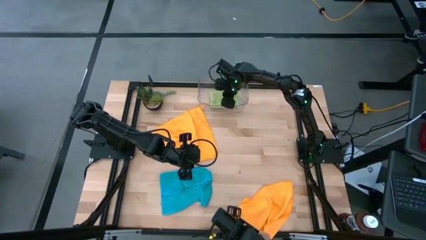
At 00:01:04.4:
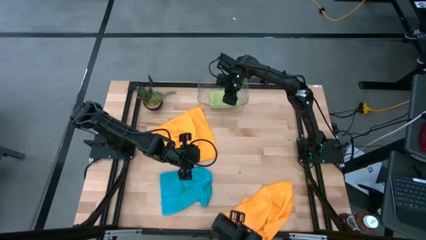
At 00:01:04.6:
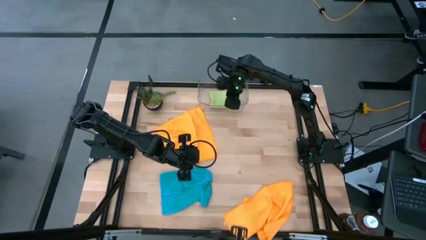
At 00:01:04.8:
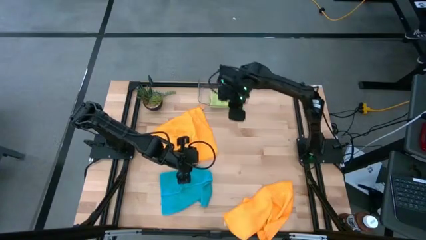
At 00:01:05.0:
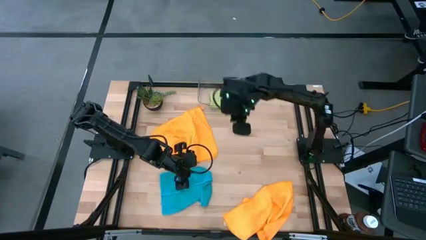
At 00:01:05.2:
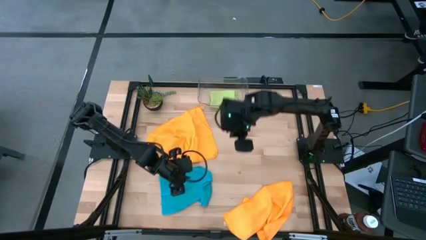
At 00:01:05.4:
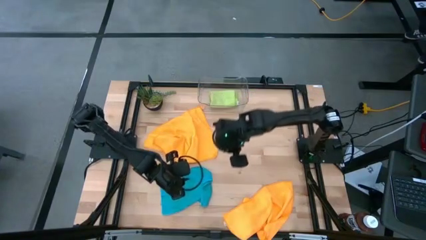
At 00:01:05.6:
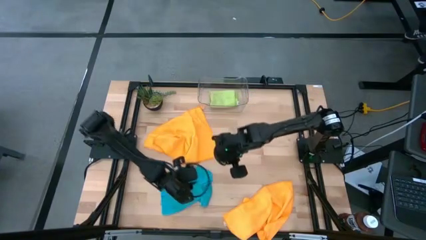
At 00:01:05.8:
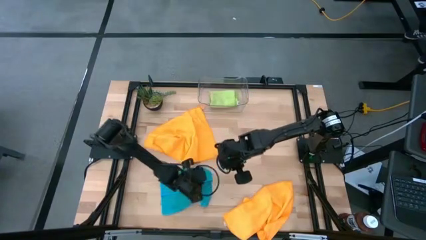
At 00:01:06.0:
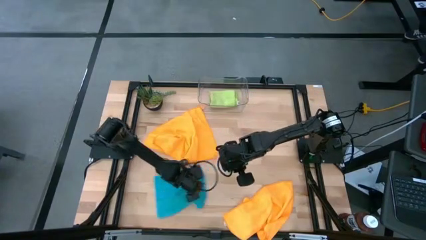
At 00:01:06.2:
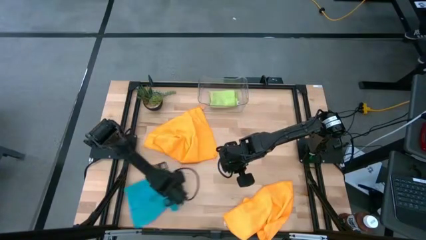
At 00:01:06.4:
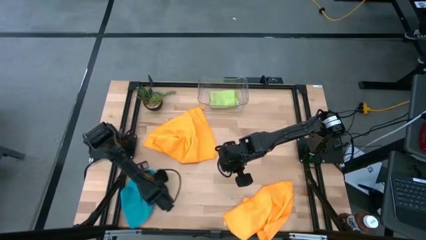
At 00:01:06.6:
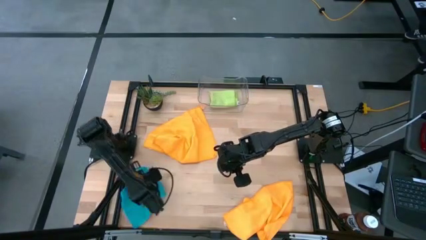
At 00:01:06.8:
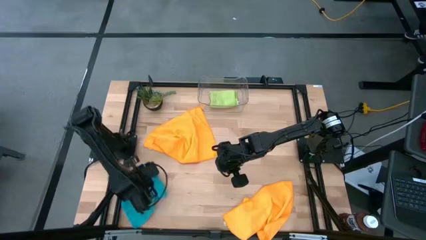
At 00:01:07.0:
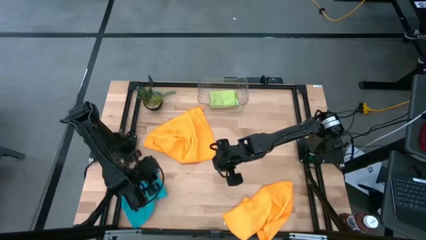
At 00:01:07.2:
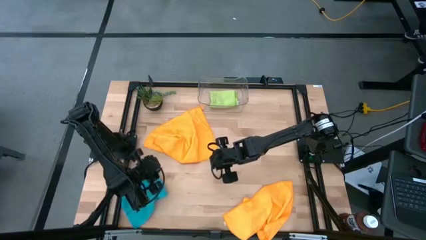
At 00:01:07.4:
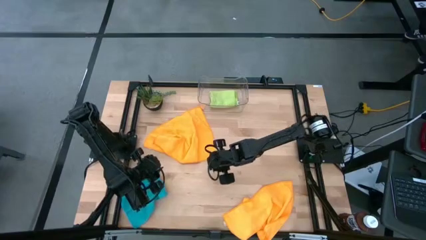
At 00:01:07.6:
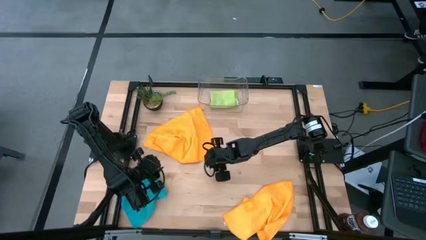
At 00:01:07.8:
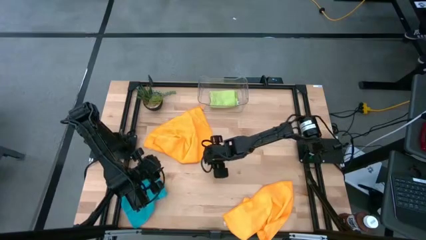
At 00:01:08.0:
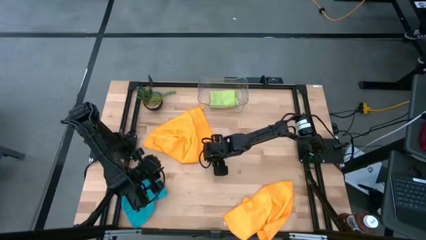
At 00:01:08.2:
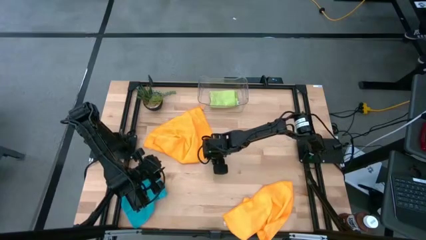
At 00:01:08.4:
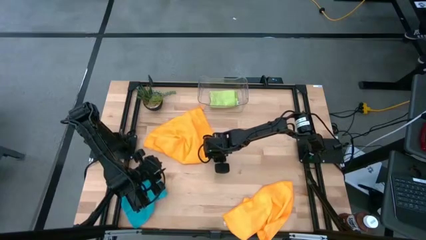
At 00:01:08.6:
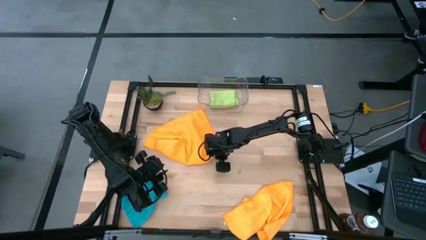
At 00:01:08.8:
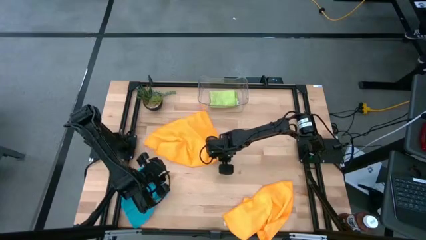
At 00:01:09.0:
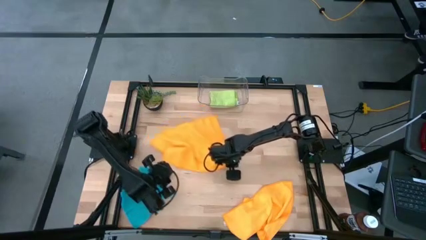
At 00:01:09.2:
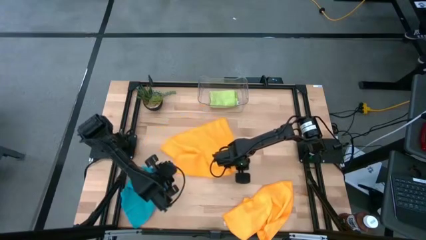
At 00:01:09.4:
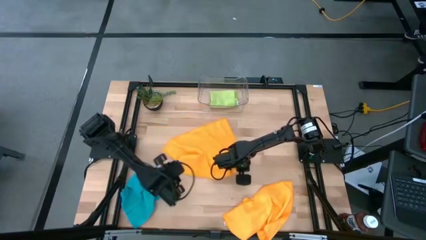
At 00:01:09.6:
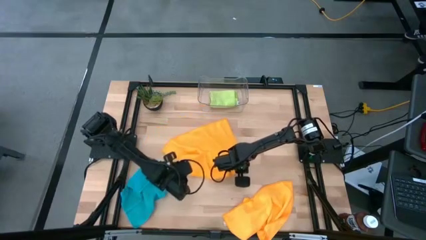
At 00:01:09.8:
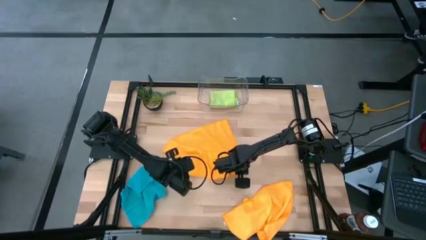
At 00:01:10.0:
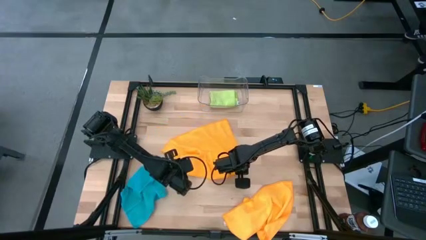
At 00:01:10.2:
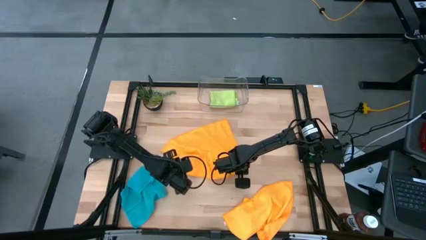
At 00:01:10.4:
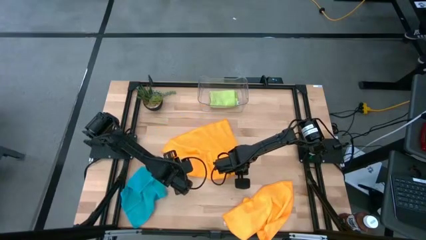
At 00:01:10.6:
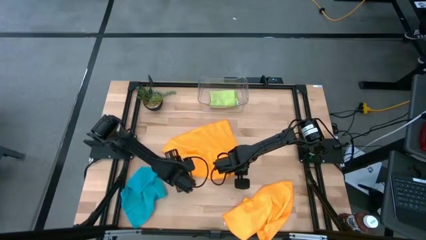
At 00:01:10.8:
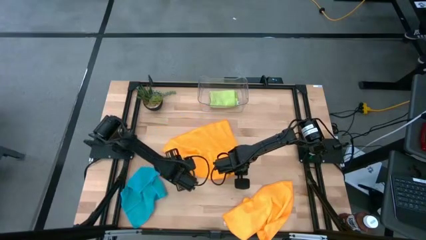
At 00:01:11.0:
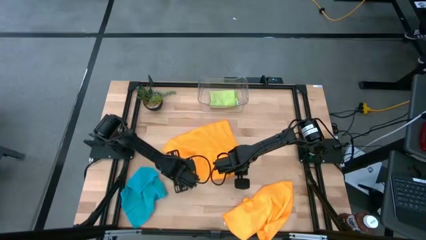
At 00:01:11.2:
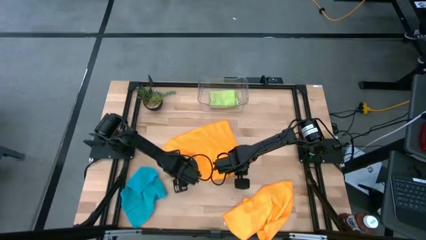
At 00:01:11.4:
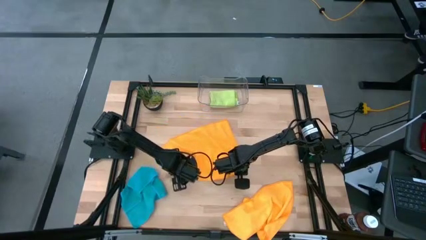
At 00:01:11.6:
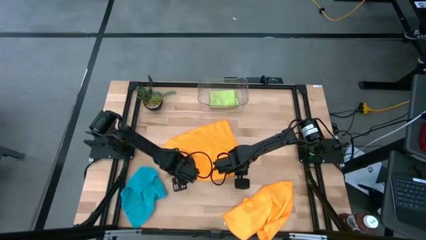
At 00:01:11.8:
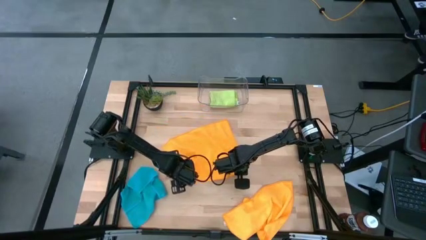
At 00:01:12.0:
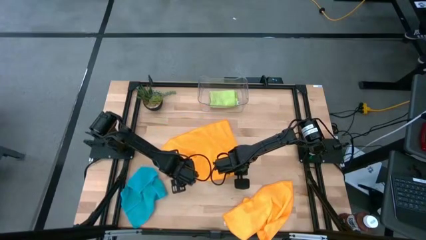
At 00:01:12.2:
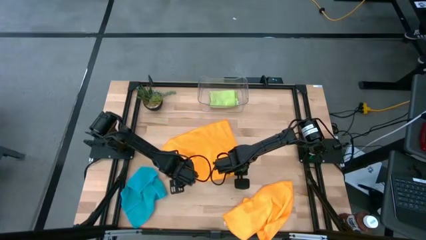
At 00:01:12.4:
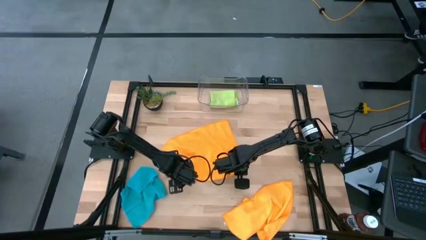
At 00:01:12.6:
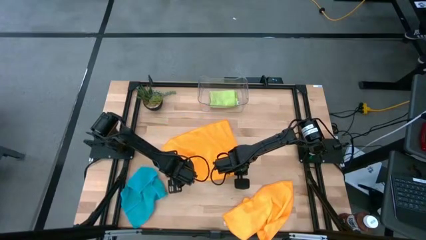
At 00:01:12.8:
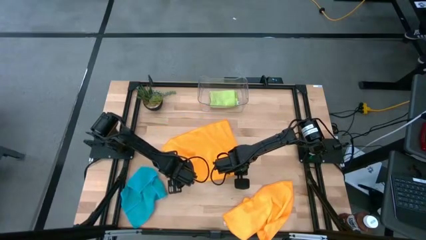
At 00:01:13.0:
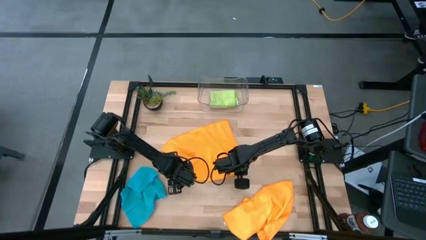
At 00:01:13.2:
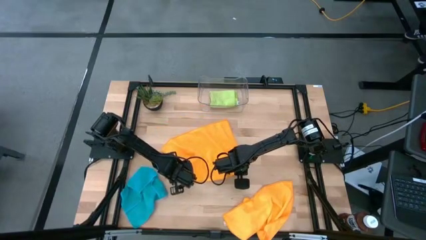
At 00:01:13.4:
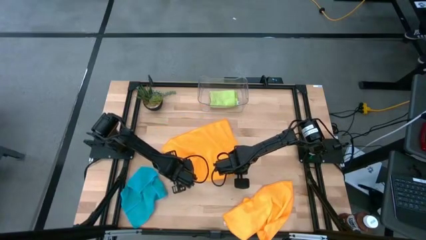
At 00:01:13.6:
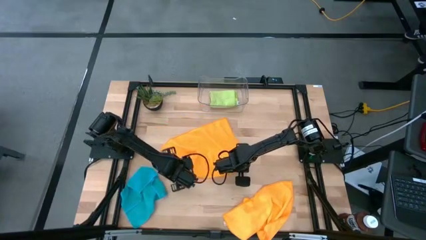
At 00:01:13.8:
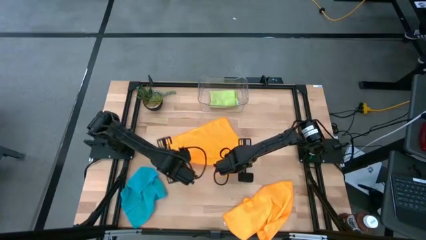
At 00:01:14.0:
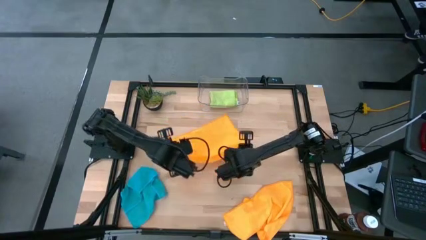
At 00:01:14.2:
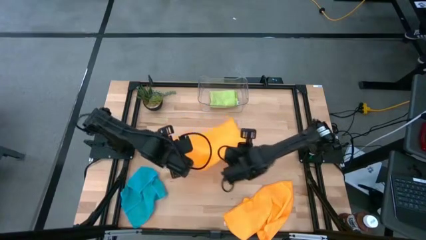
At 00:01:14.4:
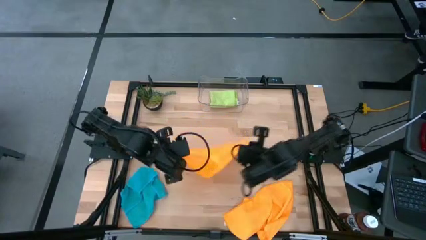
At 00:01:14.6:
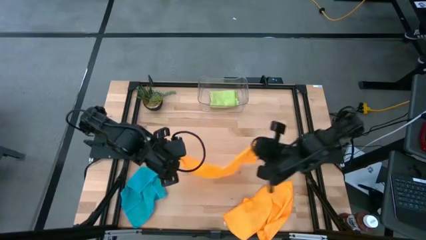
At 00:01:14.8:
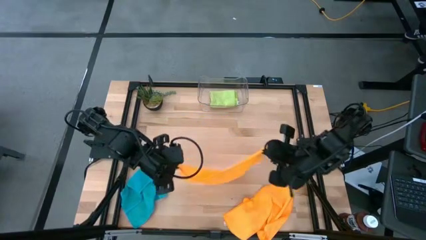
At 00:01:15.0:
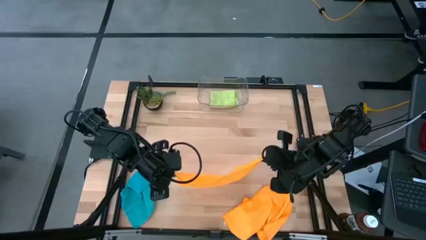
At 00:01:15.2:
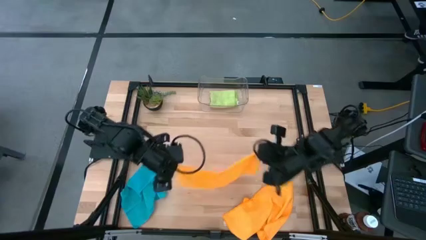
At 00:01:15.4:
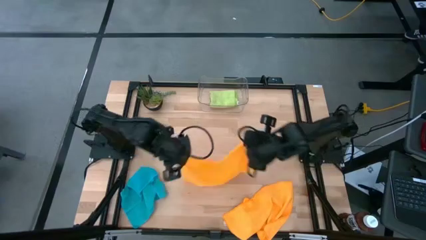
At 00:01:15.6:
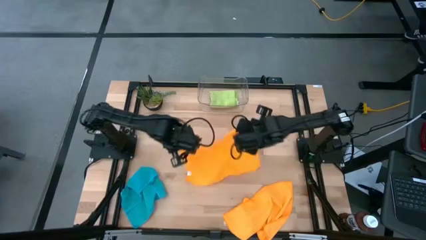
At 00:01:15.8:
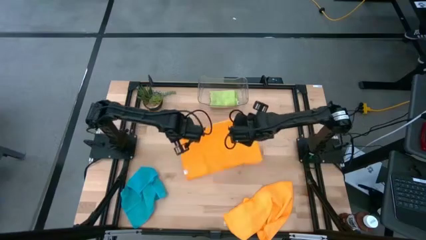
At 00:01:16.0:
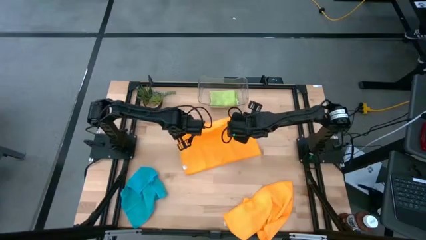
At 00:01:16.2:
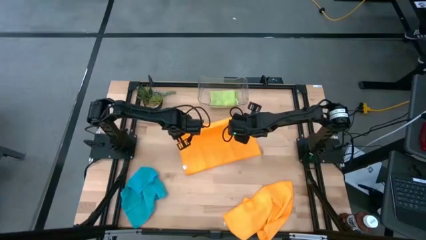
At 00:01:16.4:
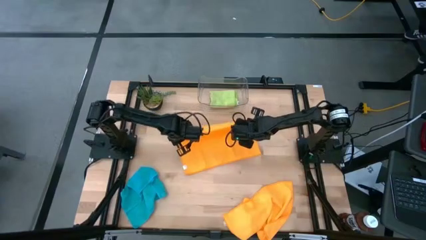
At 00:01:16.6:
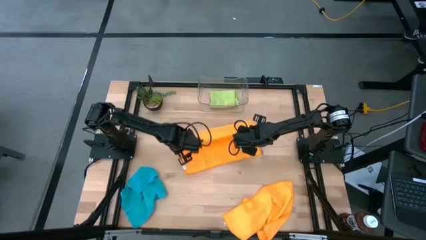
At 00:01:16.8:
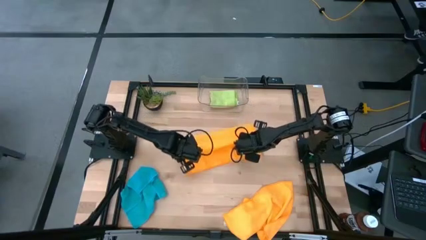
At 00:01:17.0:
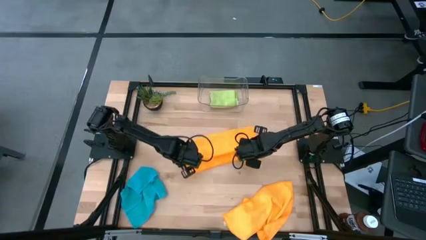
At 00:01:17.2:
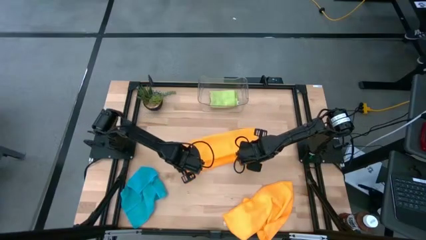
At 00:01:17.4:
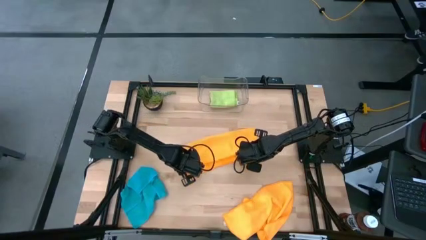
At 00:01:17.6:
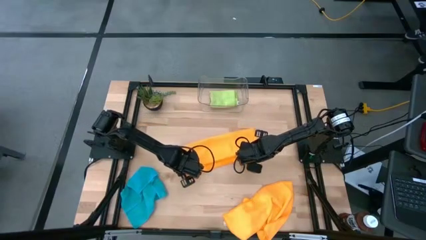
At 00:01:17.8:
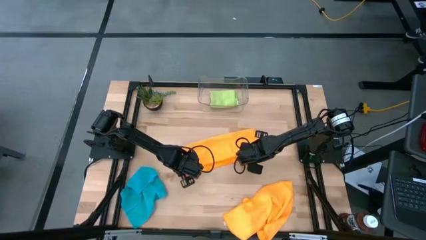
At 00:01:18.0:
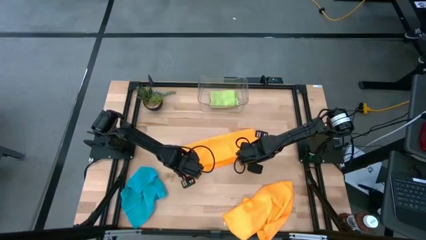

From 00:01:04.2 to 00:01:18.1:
Task: Fold microfiber towels
Fold the top orange microfiber cloth
